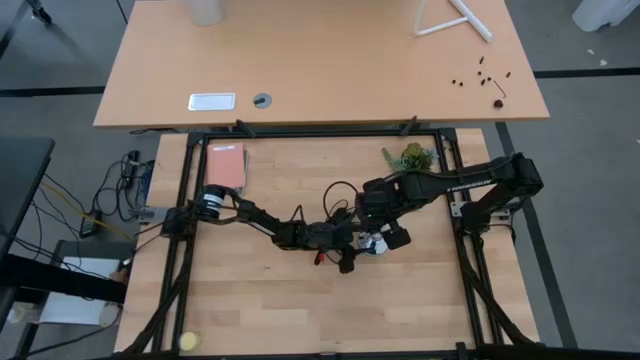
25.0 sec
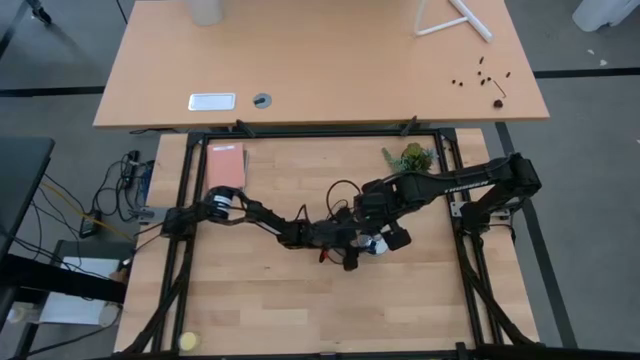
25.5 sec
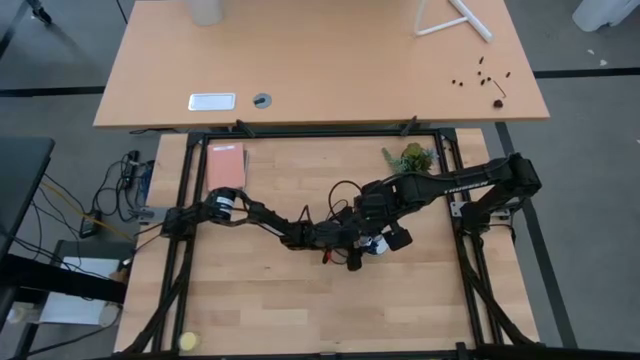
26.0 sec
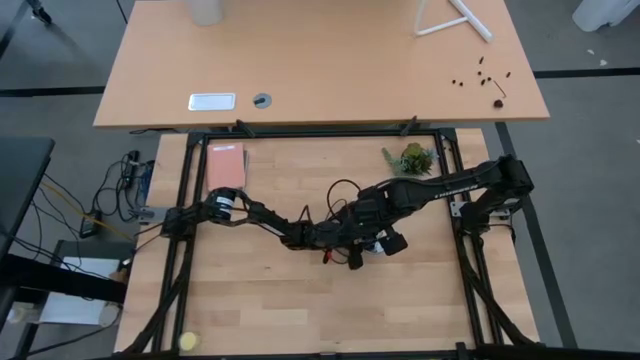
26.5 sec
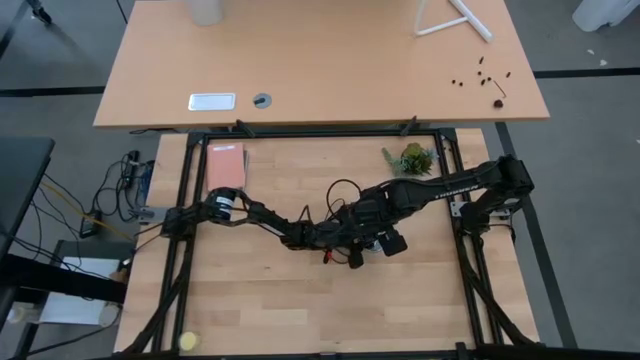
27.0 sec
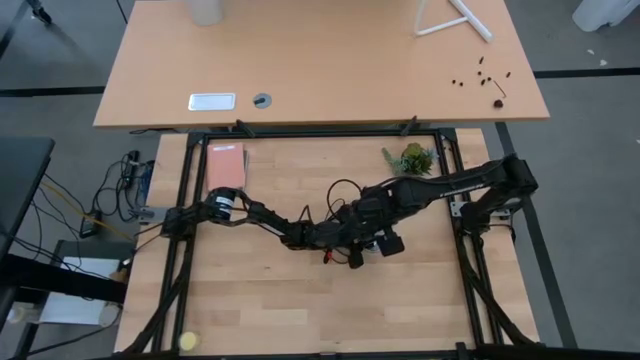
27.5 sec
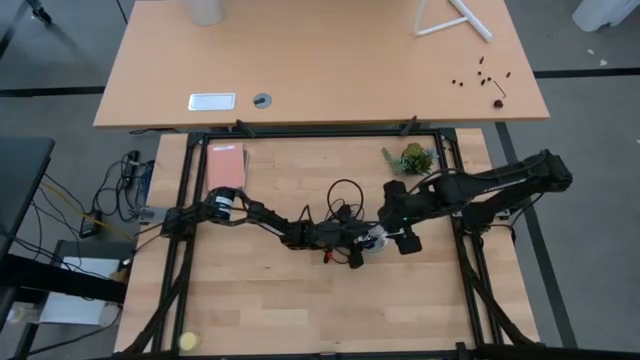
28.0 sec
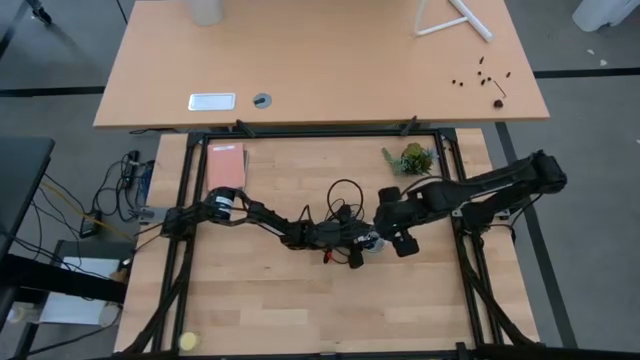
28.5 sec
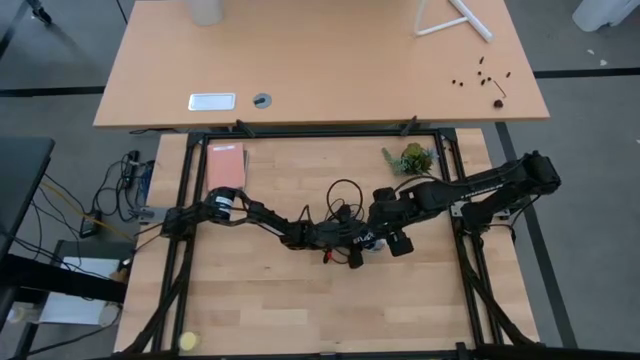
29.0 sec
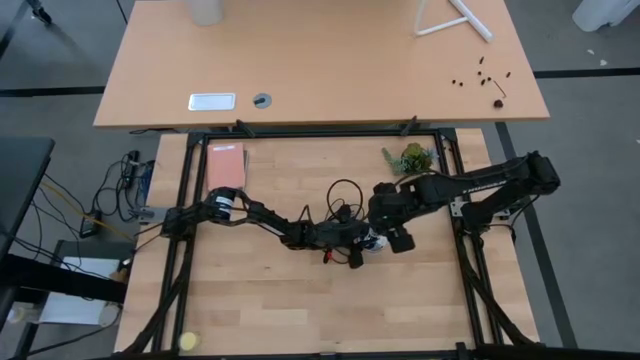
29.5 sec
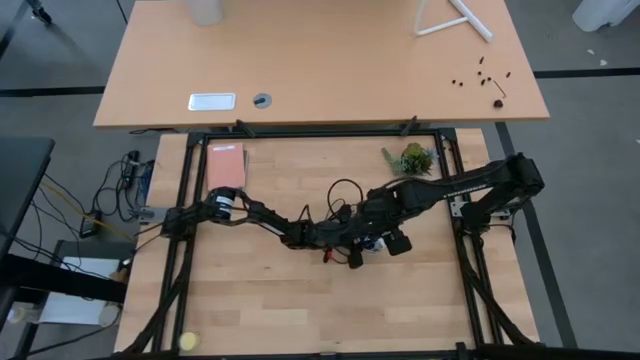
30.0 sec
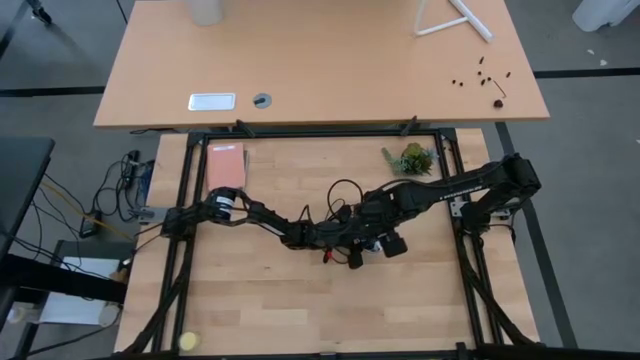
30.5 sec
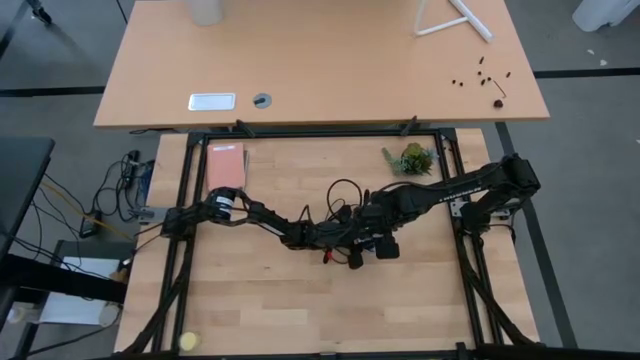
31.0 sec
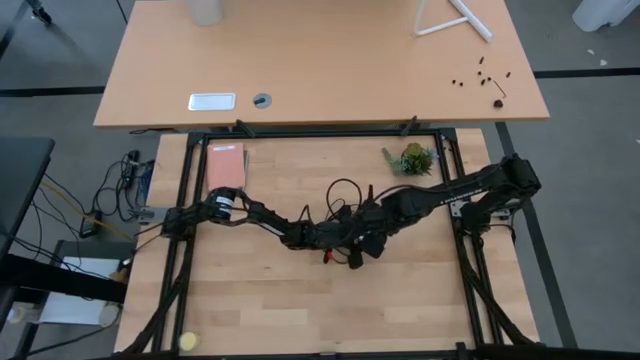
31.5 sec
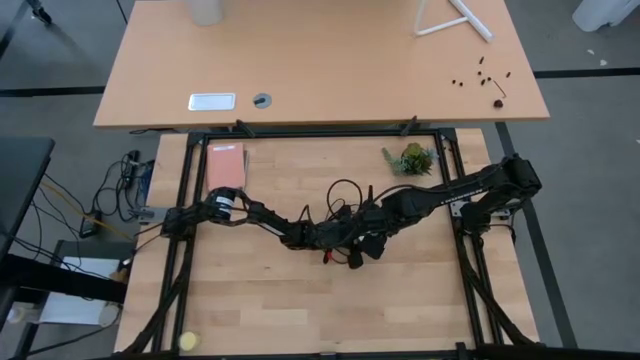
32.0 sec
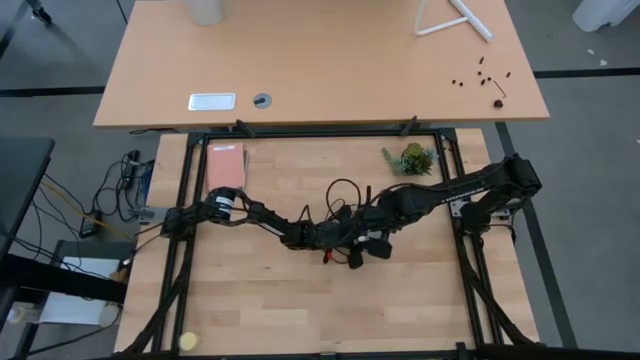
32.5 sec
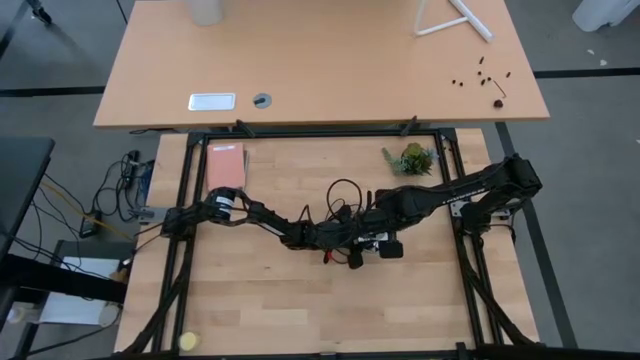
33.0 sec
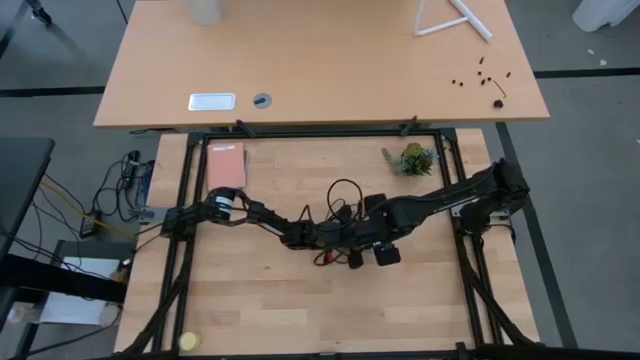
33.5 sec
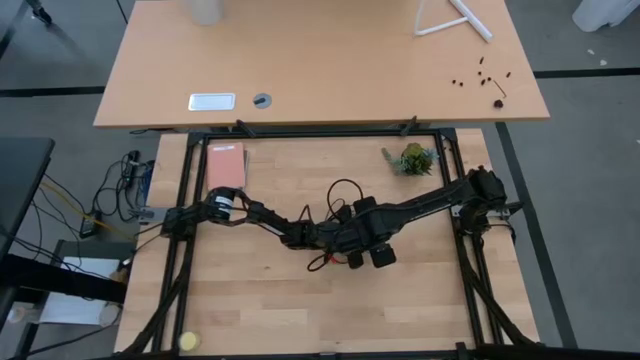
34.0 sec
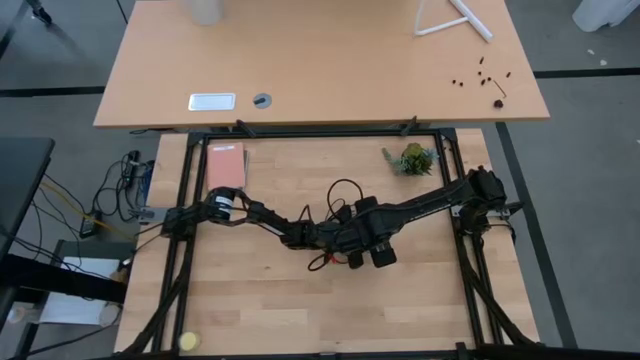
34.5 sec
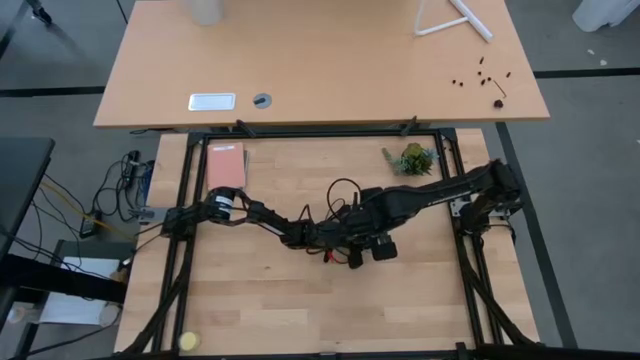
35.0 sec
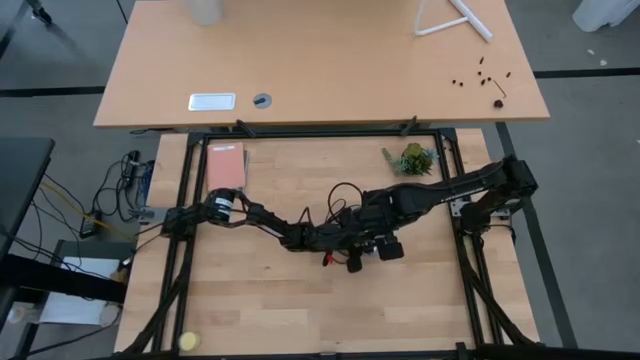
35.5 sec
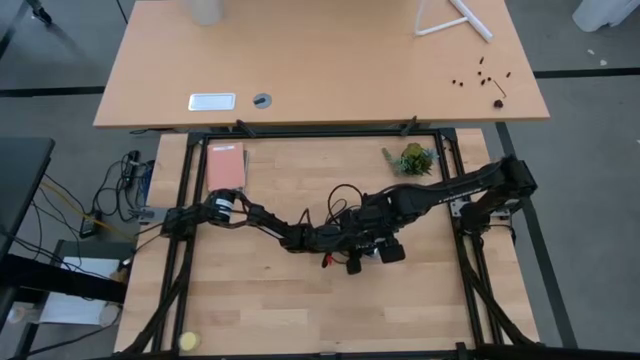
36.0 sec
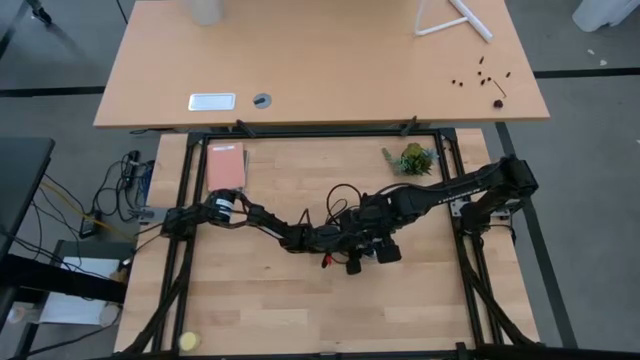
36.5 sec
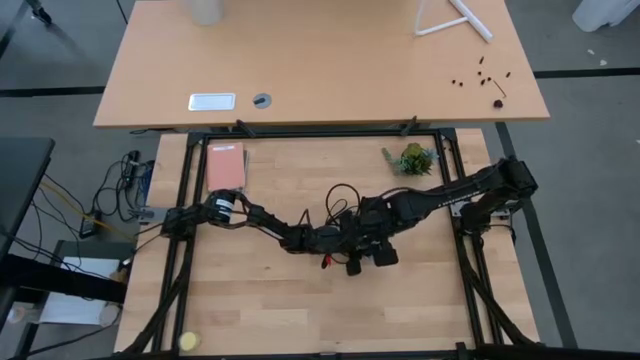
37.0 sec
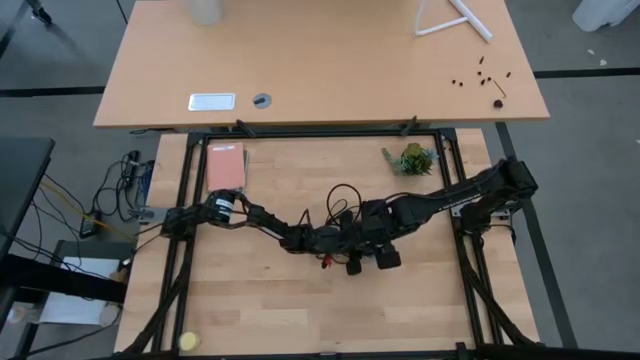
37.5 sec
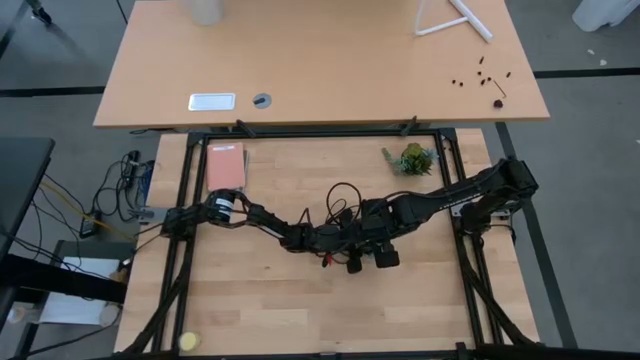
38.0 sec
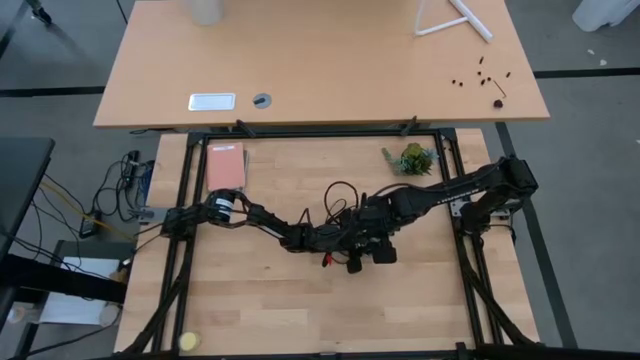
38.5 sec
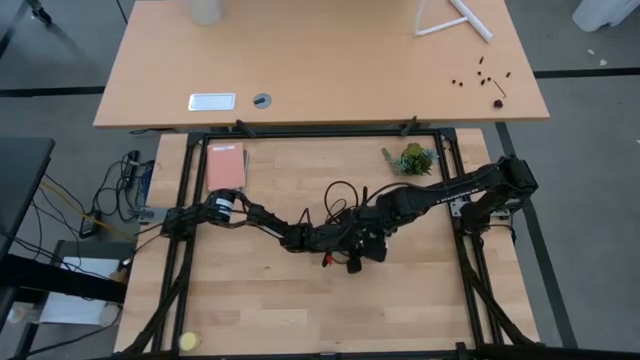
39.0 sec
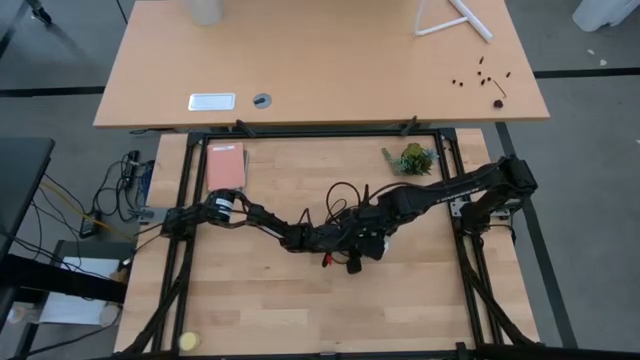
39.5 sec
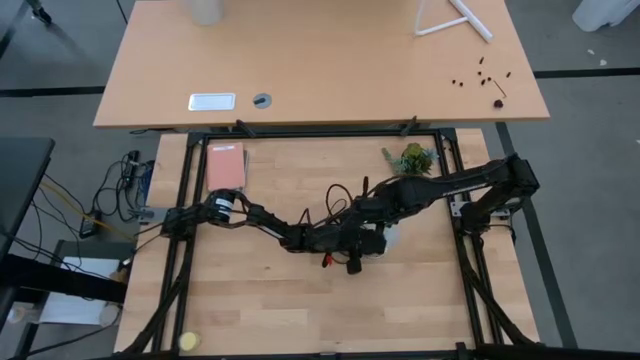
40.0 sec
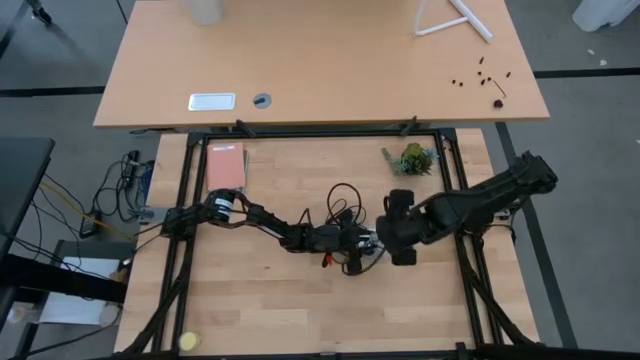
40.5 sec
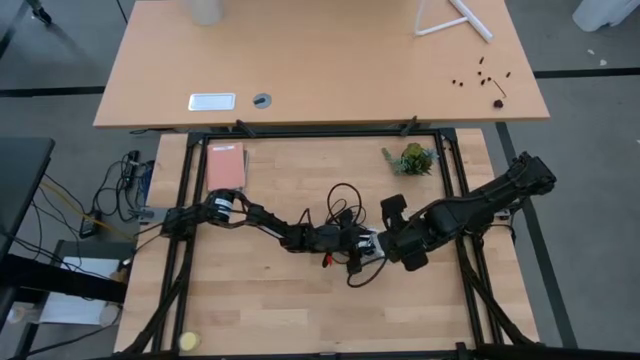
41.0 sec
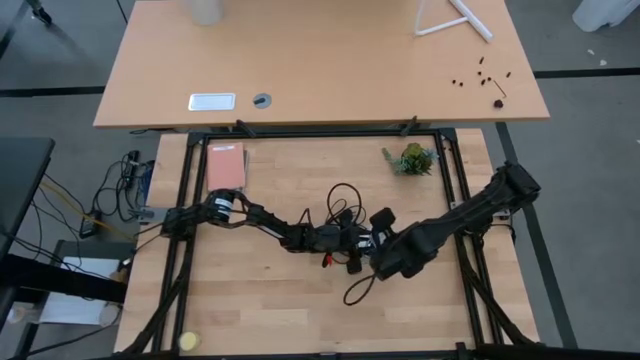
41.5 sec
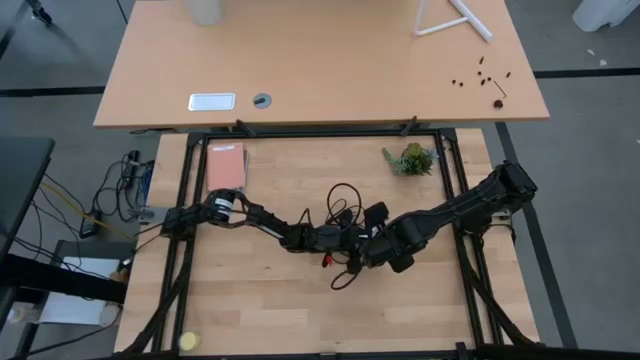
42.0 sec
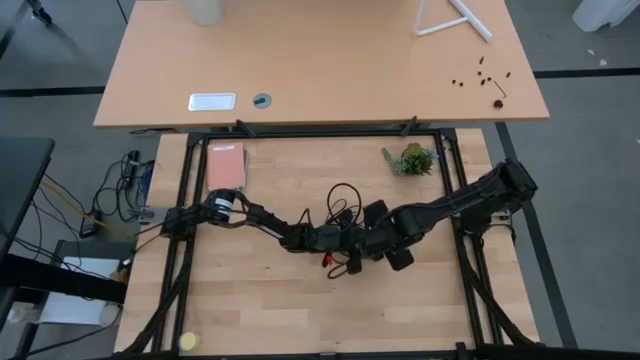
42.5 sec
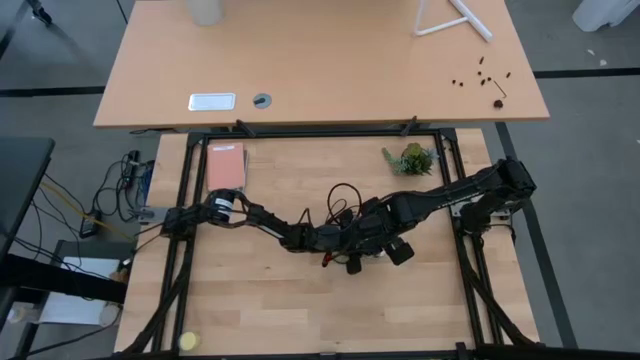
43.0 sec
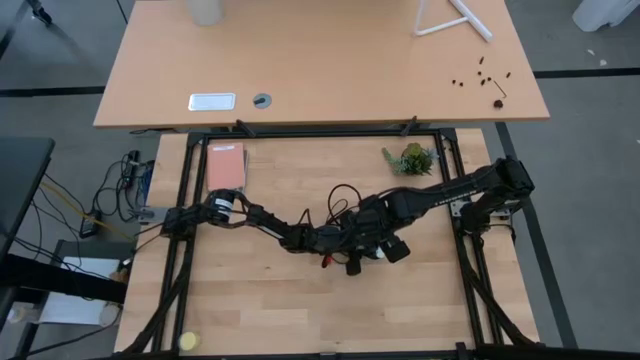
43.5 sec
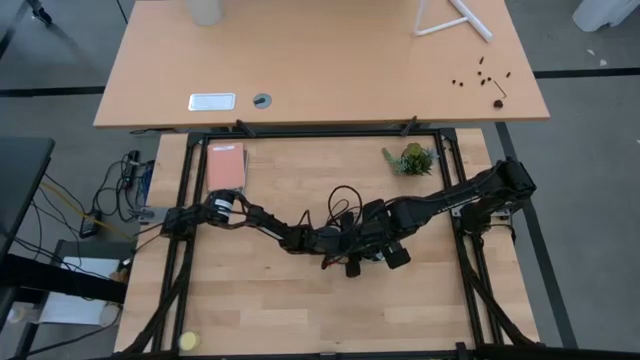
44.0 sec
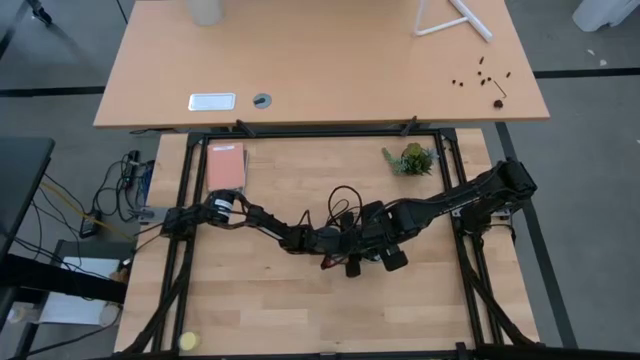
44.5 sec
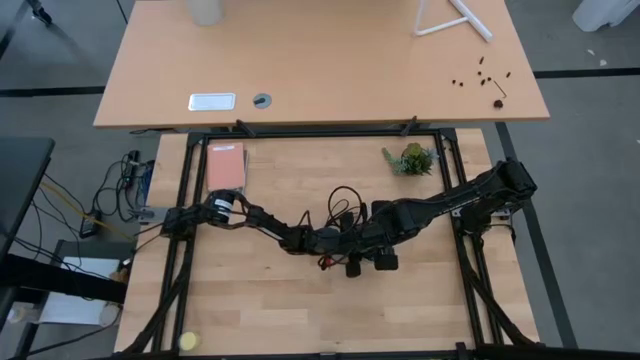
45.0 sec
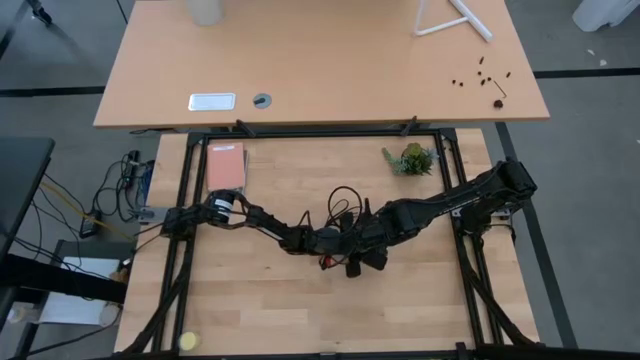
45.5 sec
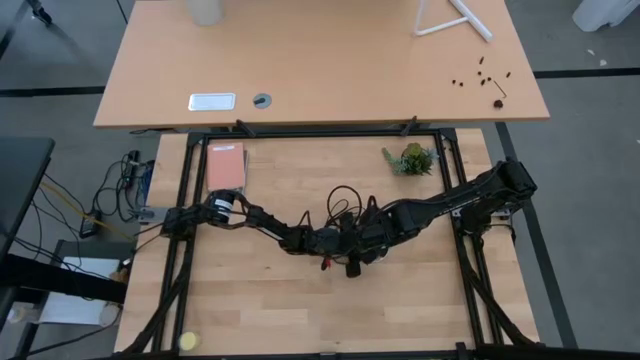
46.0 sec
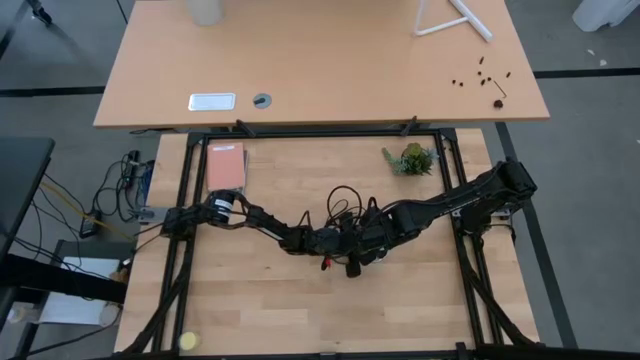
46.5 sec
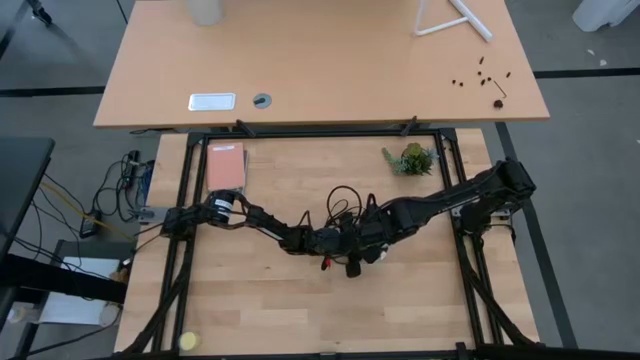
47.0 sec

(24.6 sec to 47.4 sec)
Task: Screw lightbulb
Insert the lightbulb into the lamp
